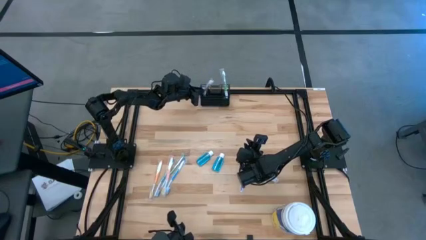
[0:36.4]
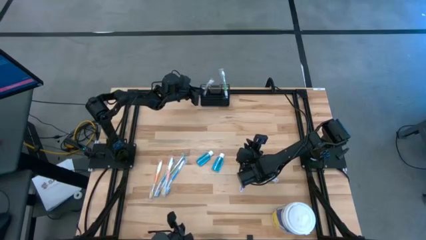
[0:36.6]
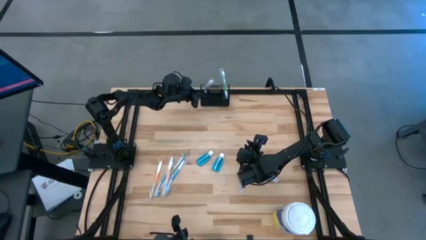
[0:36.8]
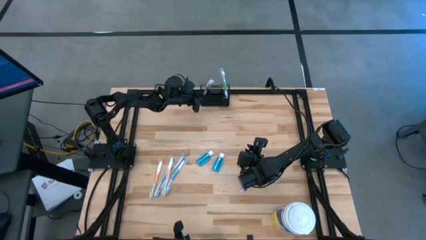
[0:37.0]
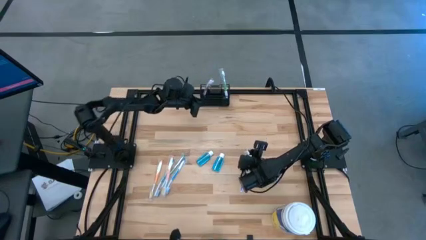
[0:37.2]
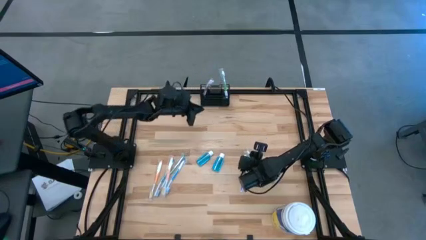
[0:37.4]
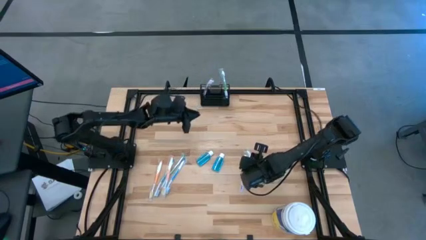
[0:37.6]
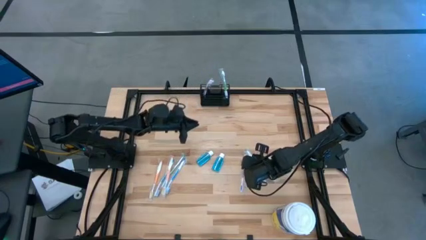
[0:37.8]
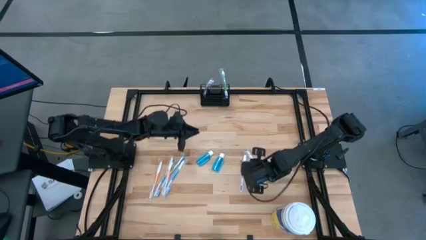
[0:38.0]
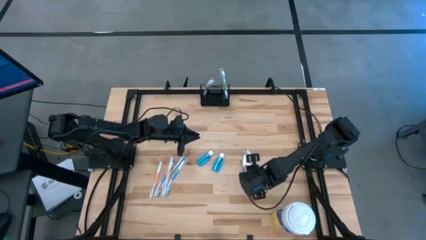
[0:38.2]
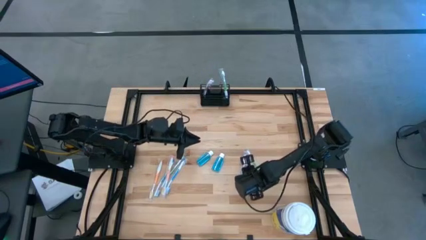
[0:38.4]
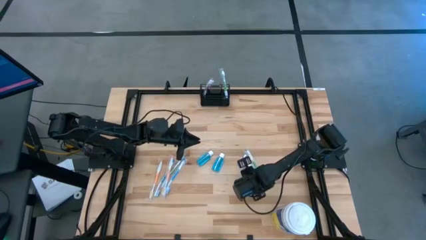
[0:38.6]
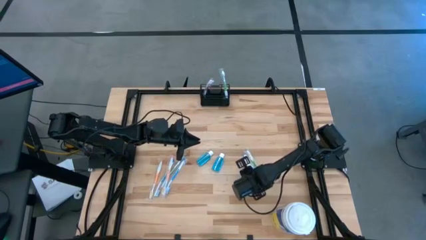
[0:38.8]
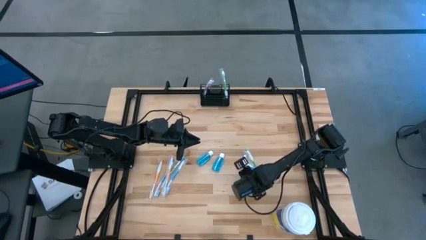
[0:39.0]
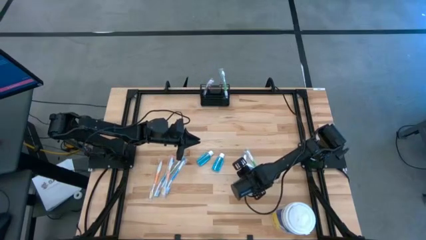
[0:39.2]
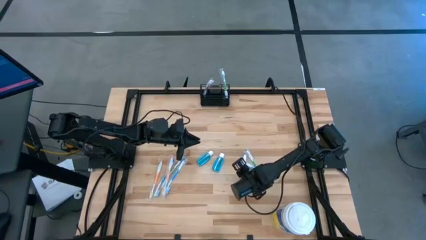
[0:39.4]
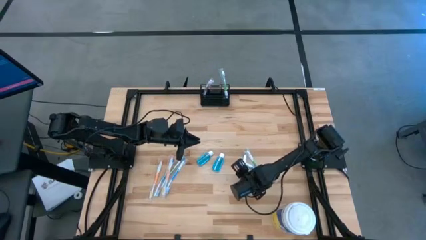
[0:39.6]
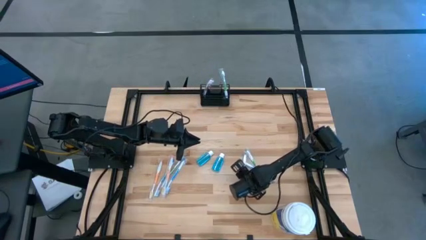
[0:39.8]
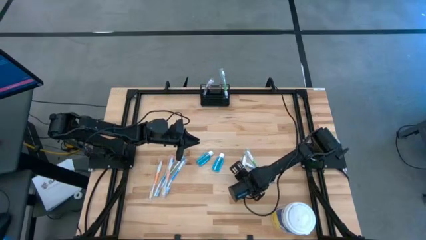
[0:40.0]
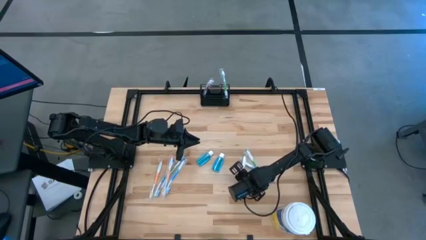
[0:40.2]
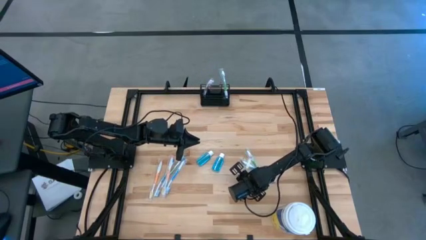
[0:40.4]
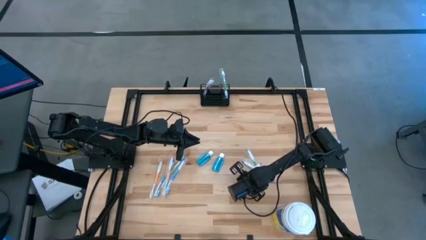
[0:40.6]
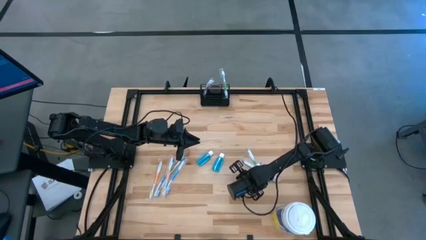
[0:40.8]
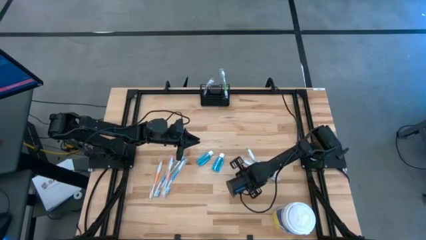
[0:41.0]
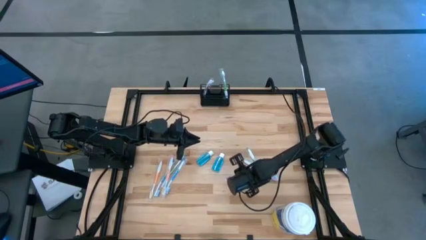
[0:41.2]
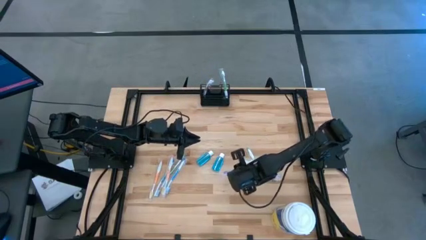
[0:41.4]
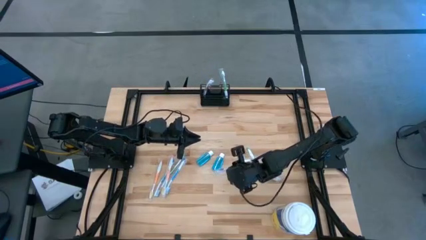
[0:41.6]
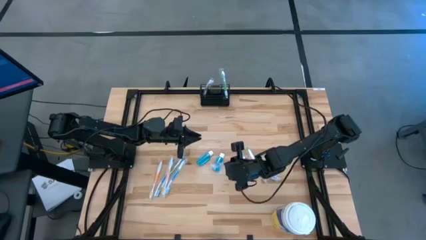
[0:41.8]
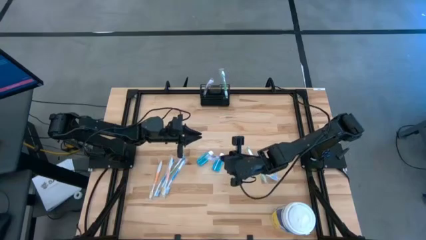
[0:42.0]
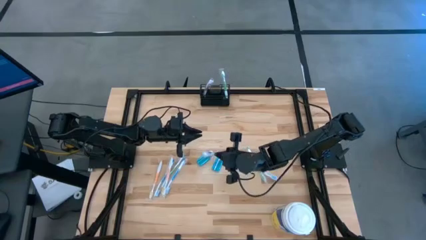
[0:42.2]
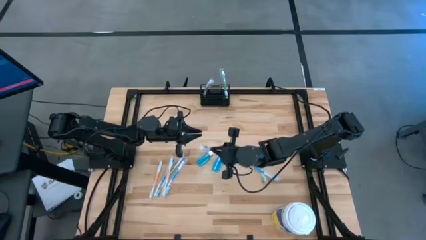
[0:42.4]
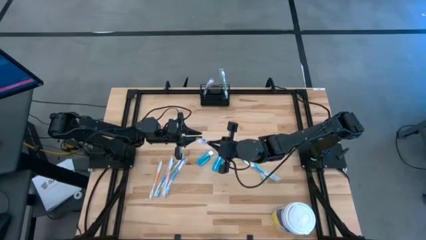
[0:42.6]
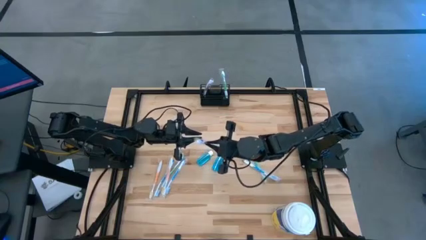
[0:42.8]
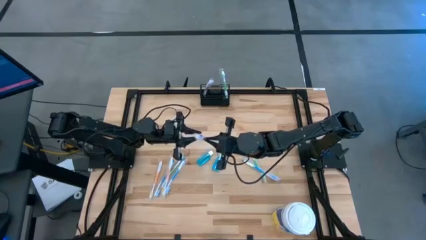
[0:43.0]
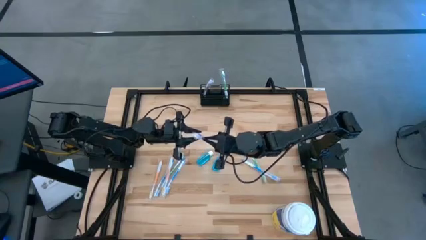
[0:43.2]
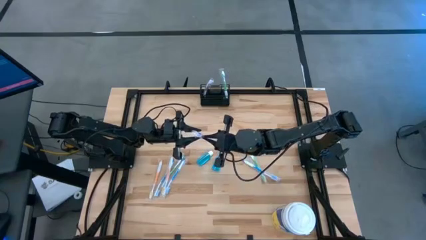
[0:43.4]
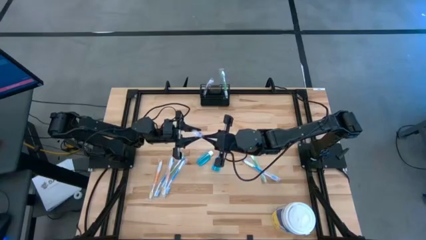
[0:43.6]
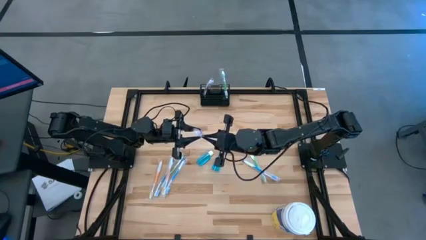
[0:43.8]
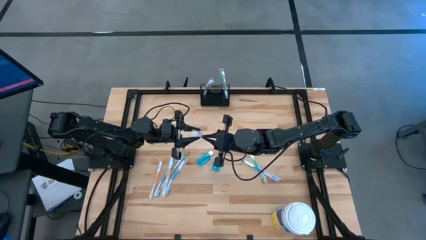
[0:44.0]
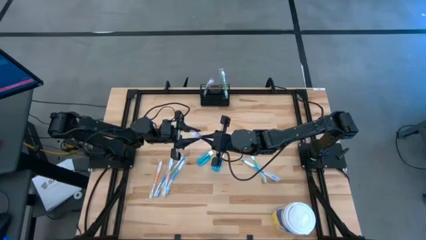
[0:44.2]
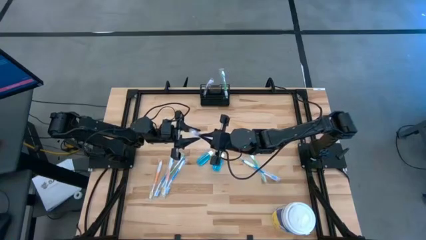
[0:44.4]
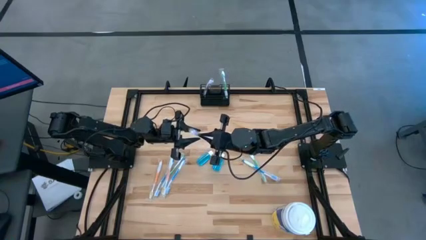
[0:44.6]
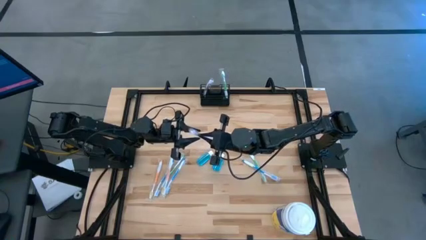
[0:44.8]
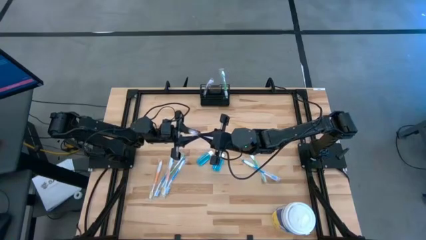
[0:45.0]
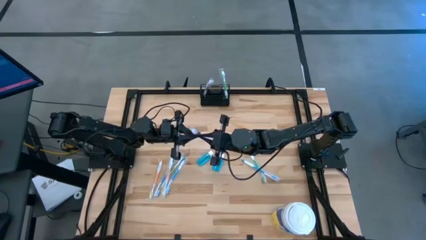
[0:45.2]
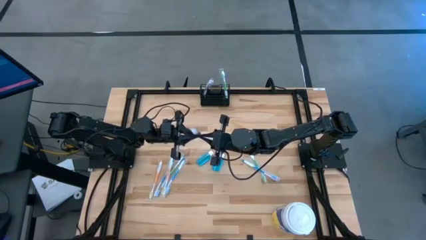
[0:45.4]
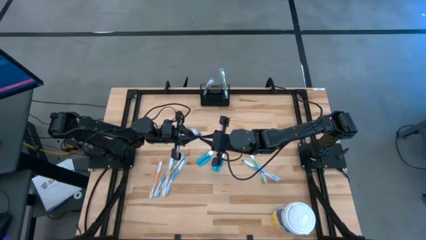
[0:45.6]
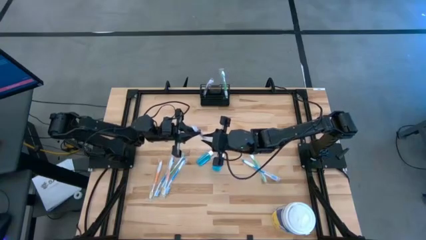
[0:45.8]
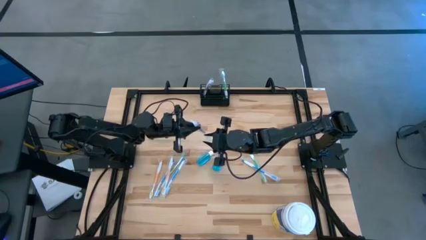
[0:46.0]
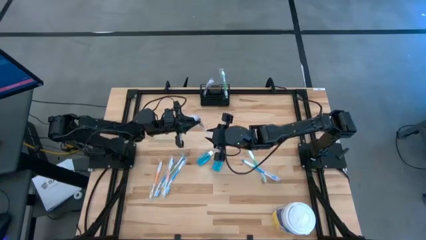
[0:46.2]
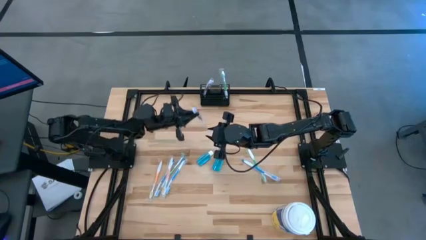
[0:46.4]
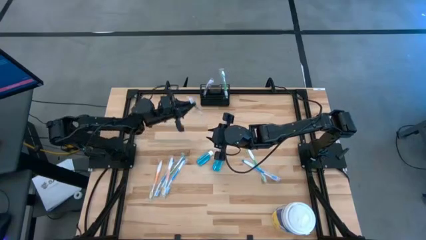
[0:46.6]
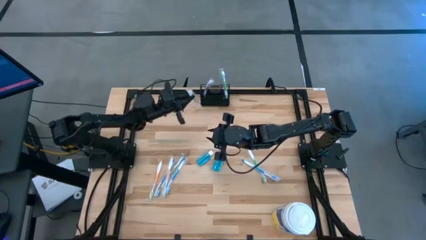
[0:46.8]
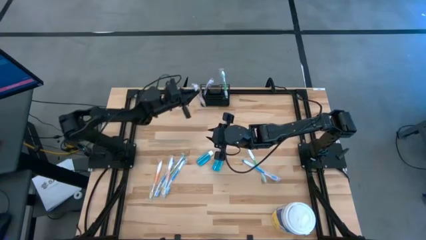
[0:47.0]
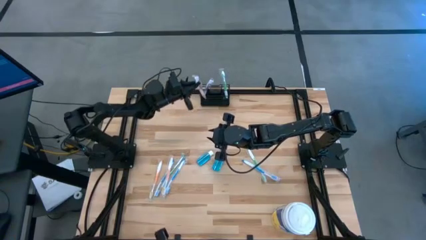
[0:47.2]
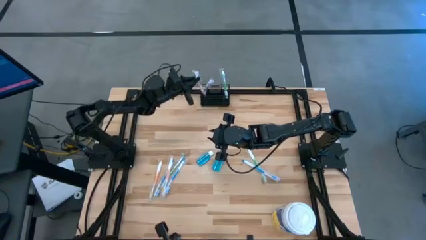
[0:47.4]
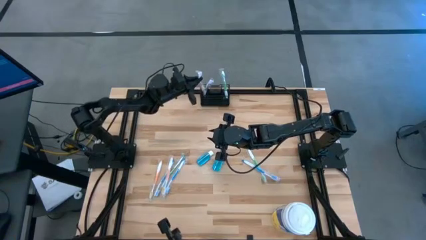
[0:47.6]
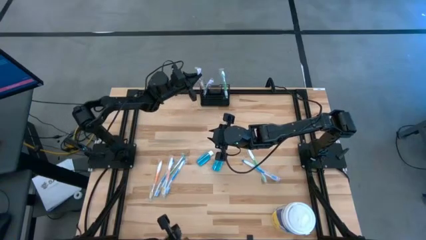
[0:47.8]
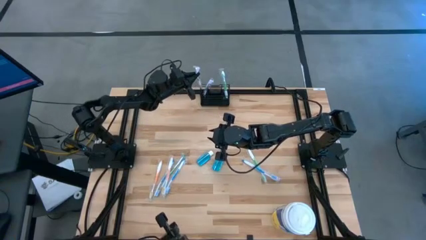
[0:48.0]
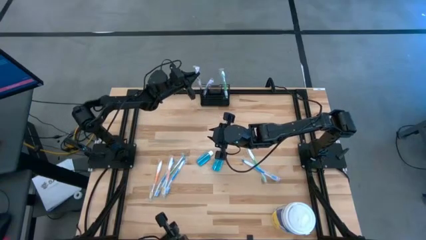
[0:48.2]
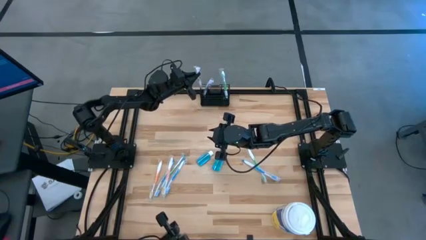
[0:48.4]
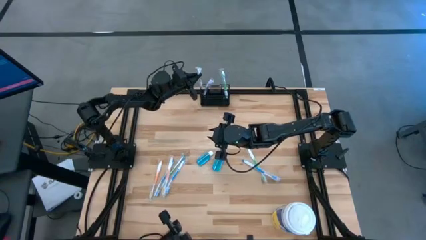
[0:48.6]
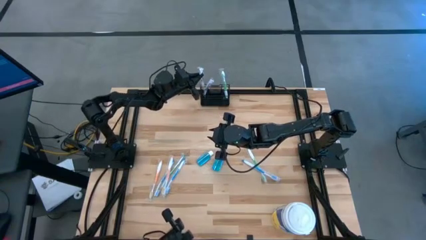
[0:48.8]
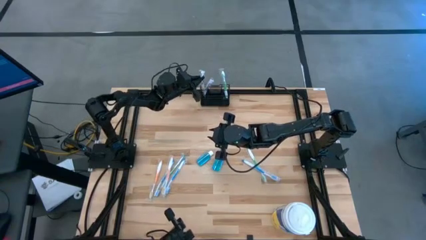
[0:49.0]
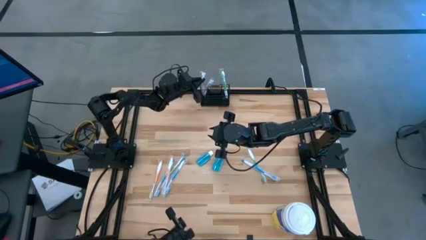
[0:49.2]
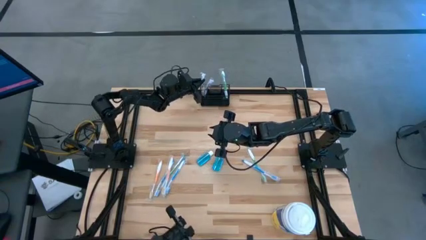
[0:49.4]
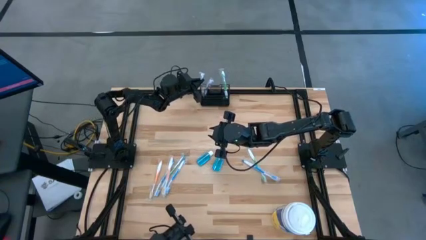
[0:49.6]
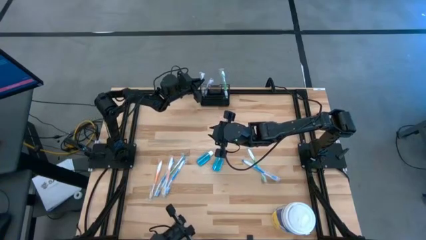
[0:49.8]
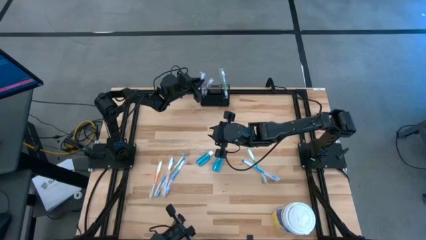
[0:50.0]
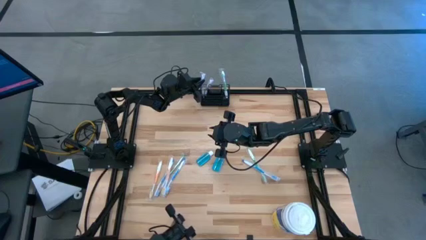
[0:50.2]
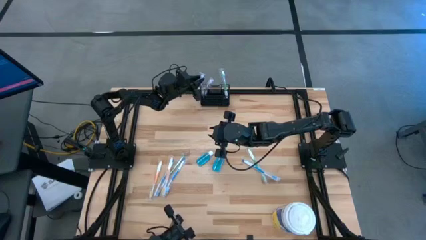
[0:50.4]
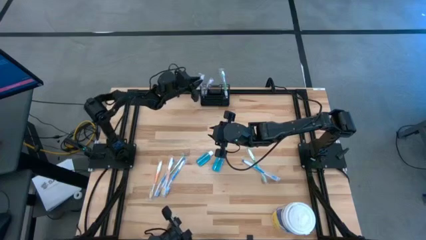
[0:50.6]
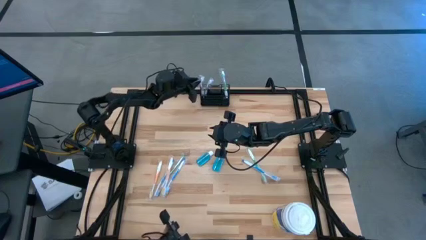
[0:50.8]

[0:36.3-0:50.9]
Task: Pick & Place toothbrushing station
Put the violet toothbrush into the black wire organizer
